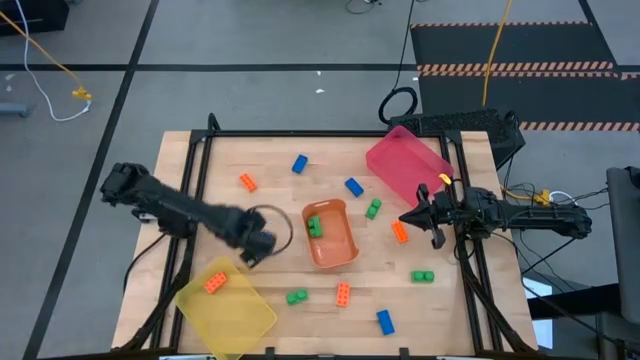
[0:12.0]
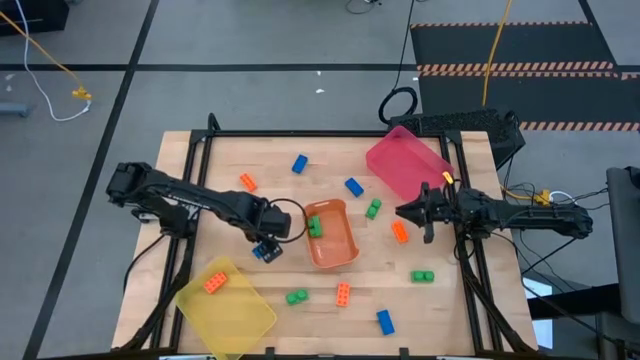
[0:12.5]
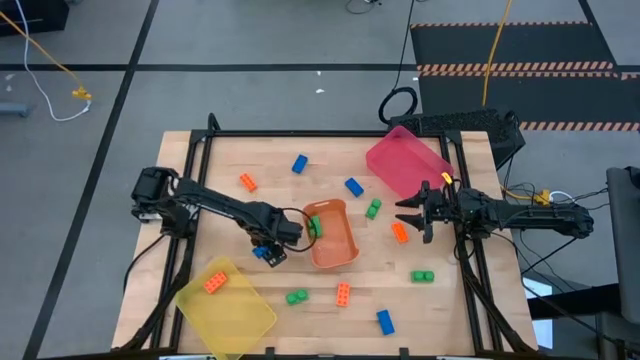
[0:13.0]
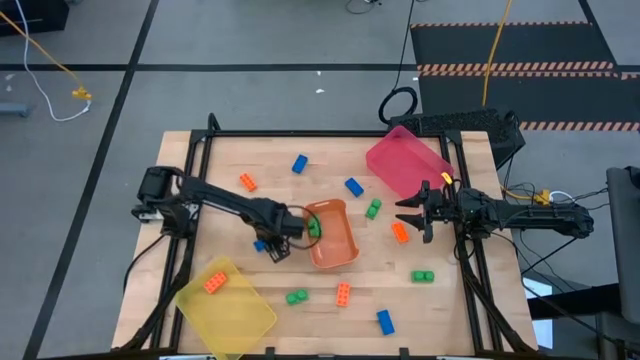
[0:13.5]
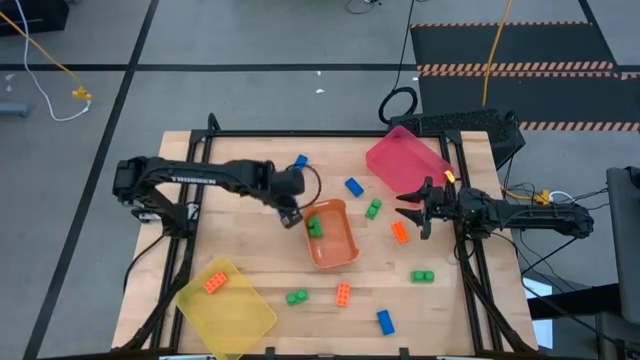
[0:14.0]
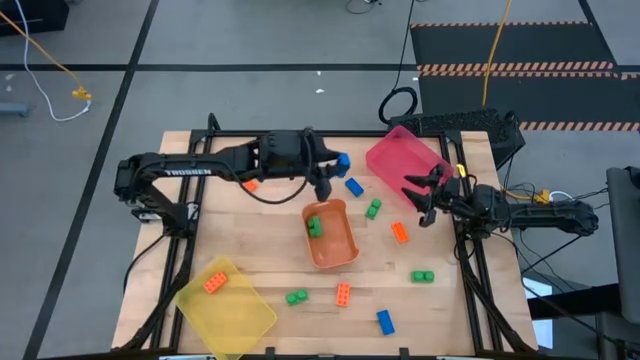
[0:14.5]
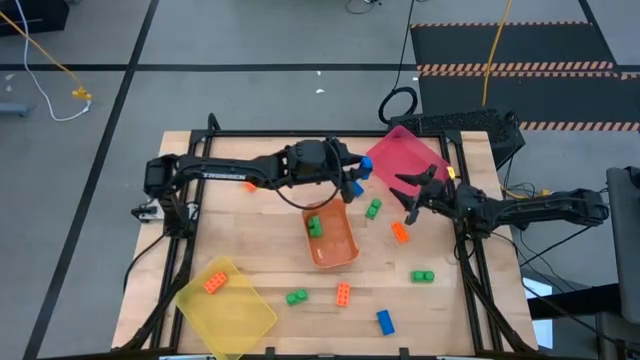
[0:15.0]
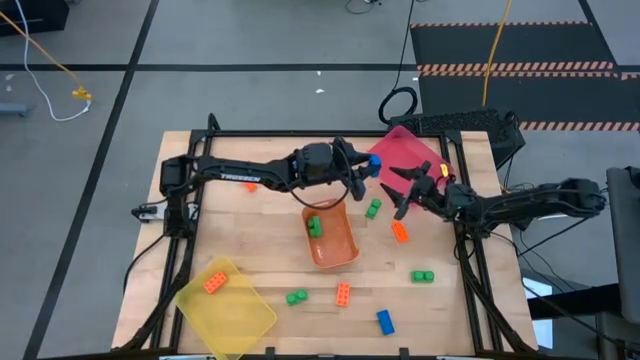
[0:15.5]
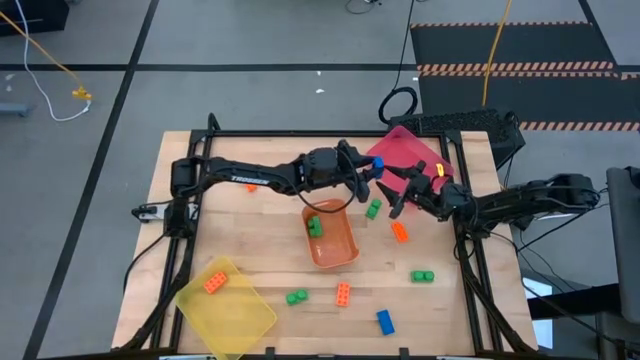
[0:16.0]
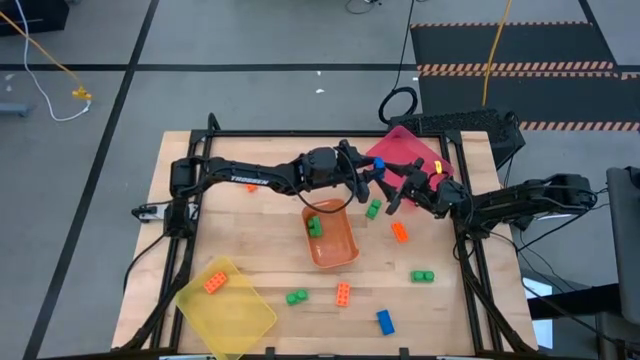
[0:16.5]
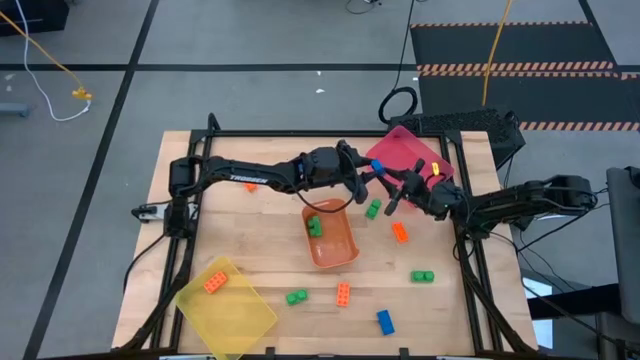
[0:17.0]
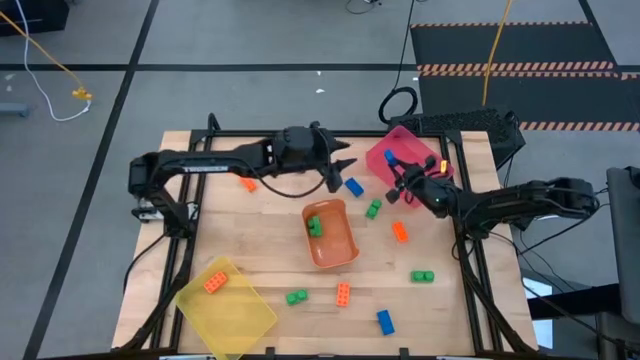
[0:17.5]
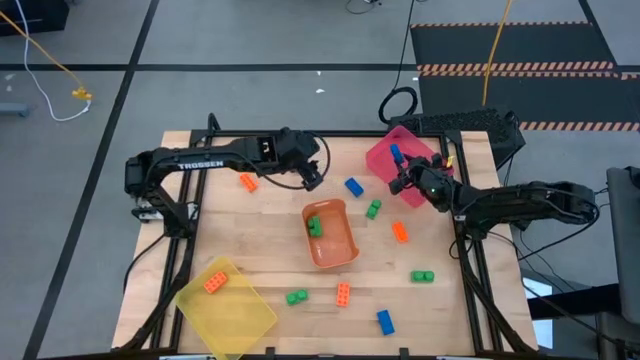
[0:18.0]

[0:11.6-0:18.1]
Task: Sort & place blocks by color
Put the blue game piece into the pink bin

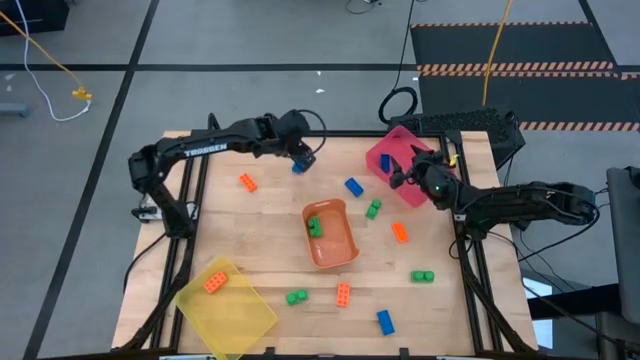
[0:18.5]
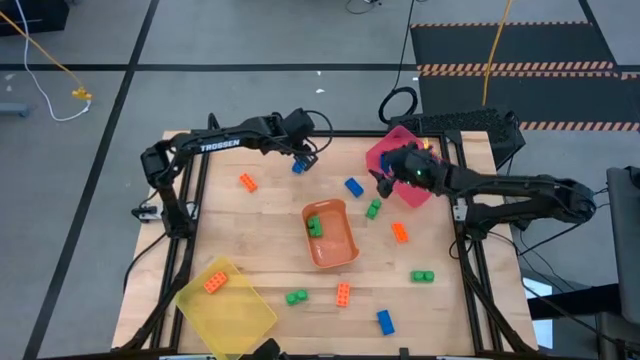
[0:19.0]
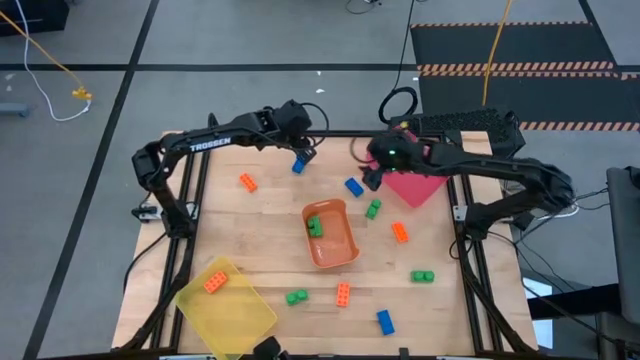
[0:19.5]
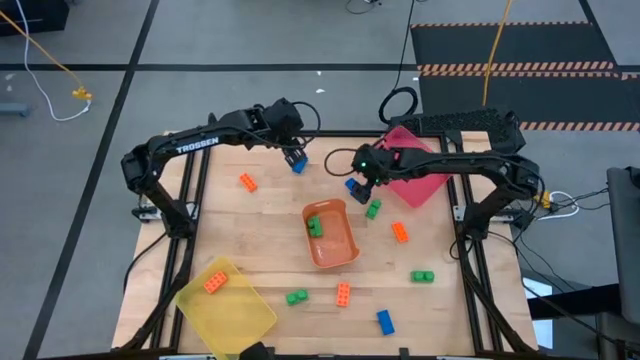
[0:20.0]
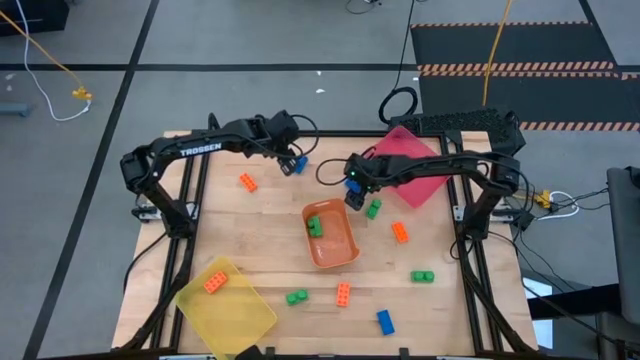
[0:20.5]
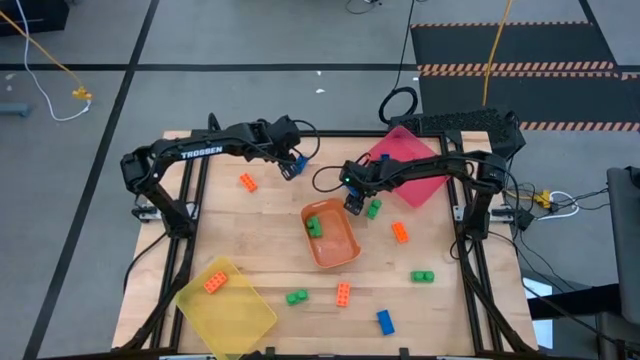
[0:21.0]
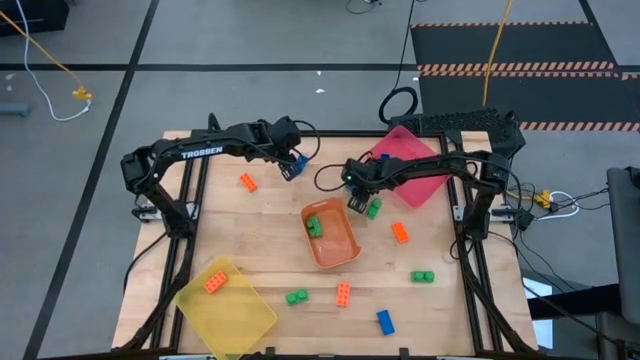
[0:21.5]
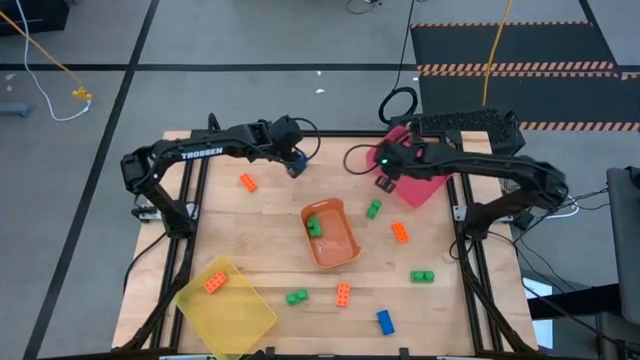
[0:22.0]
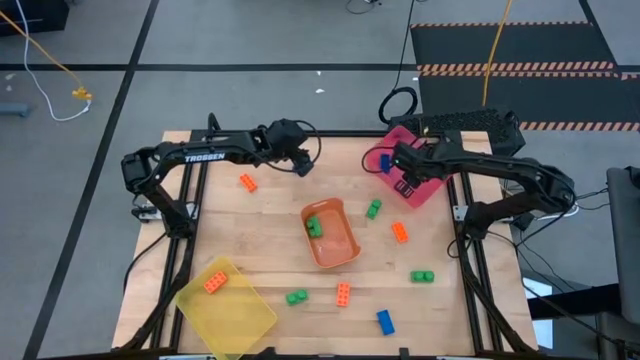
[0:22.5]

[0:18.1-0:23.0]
Put the blue game piece into the pink bin

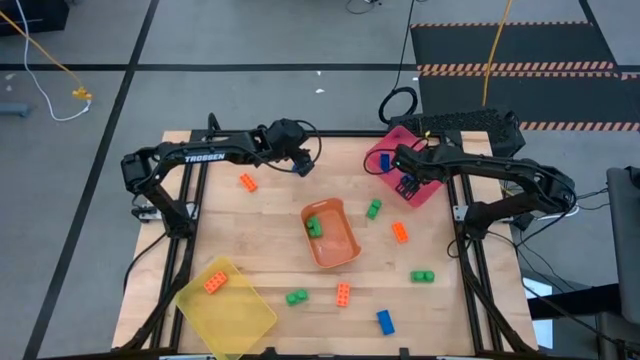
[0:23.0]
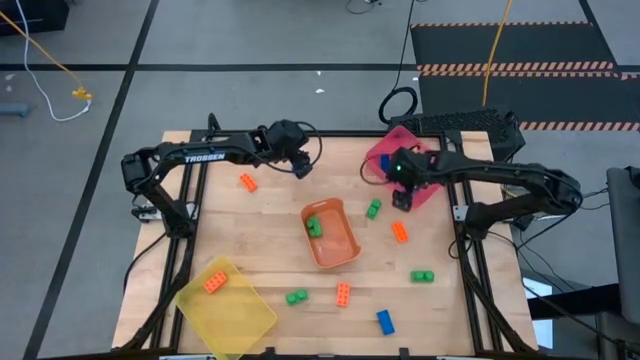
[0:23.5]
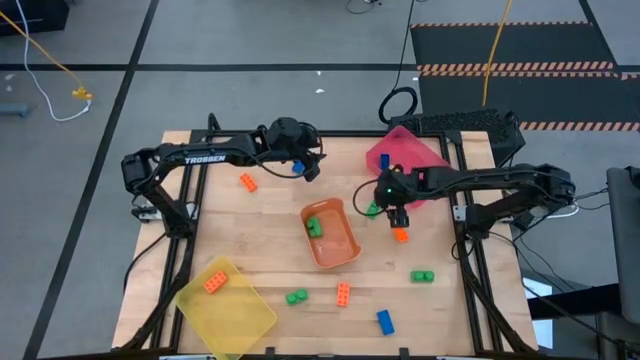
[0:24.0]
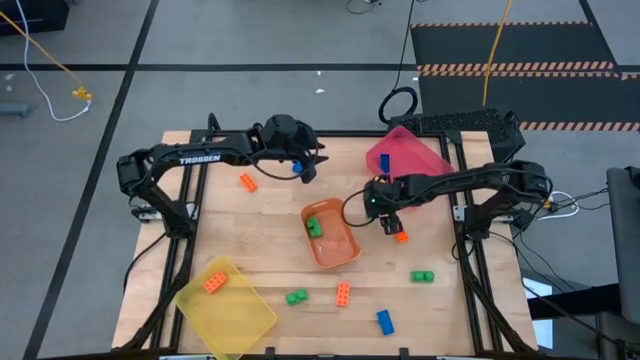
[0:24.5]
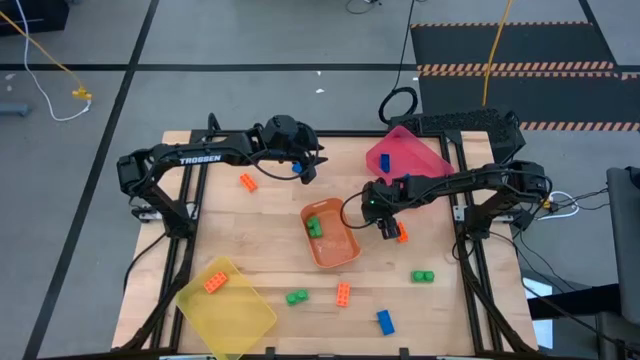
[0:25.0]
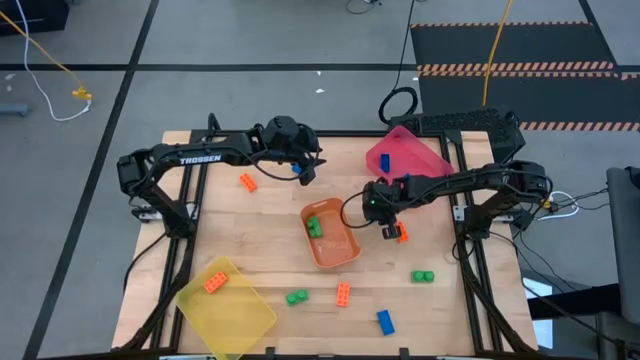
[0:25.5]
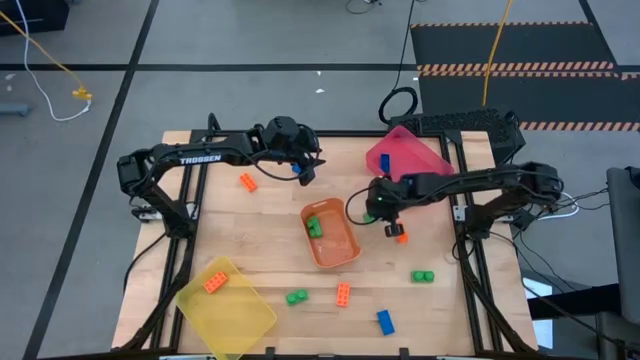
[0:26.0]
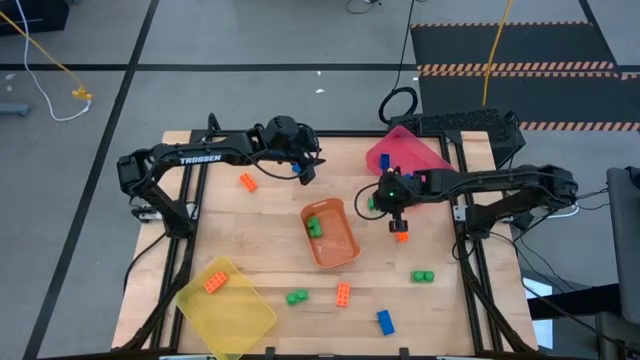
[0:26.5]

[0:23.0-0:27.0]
Put the green game piece into the orange bin

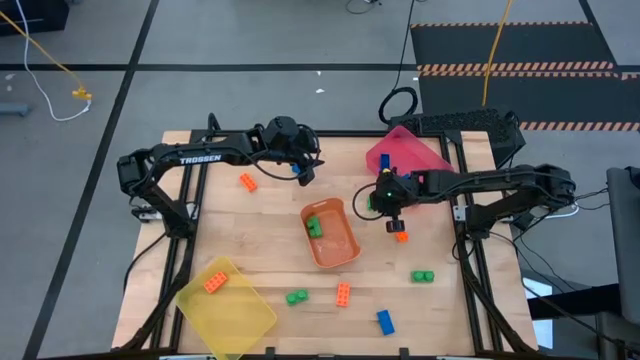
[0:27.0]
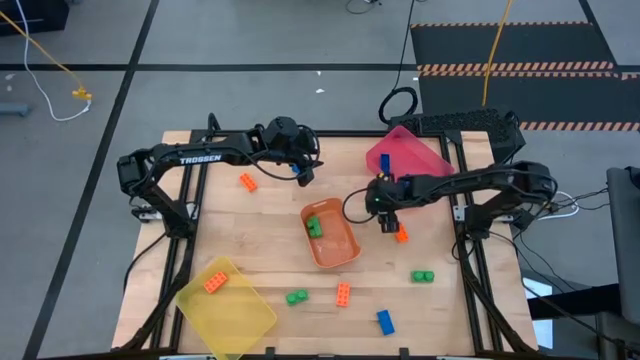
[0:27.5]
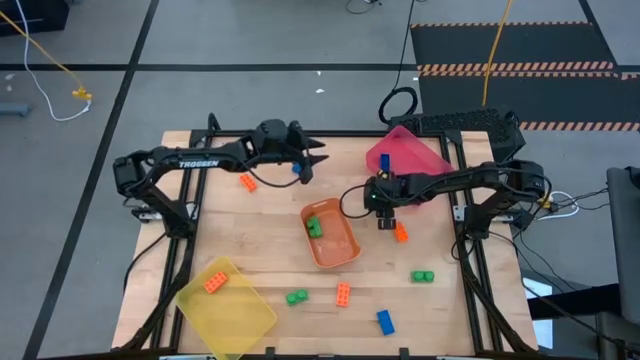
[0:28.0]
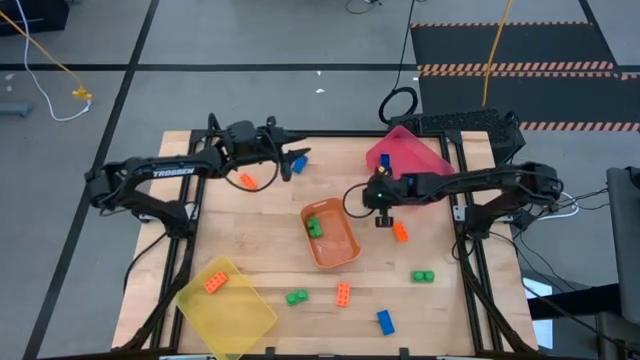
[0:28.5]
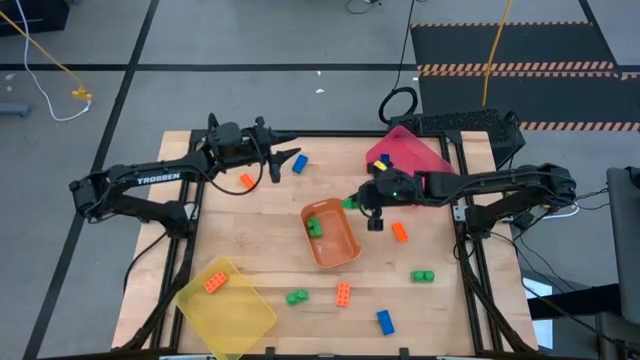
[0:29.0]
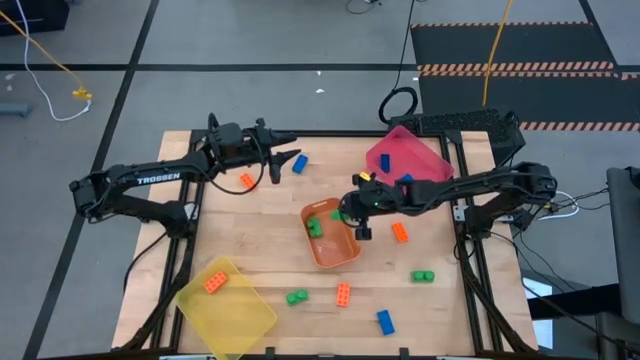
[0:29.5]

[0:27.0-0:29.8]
Put the green game piece into the orange bin

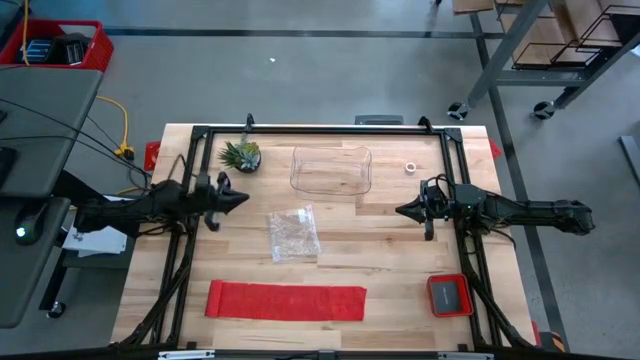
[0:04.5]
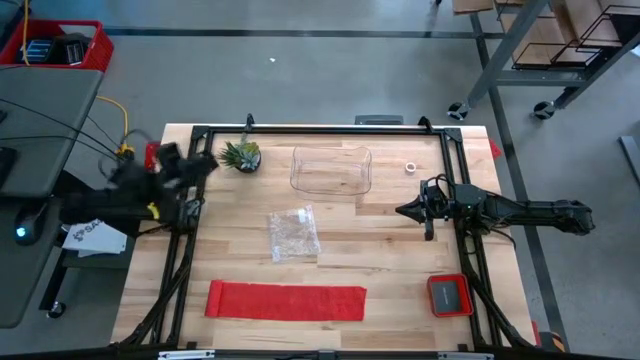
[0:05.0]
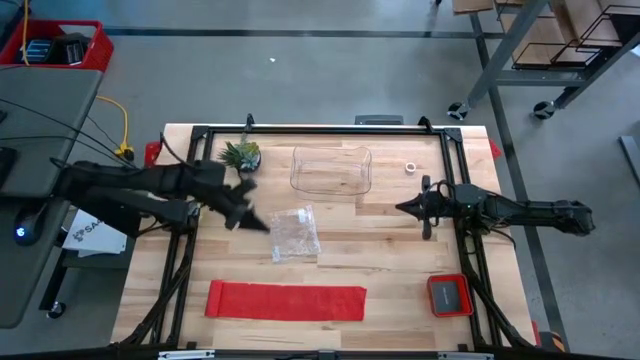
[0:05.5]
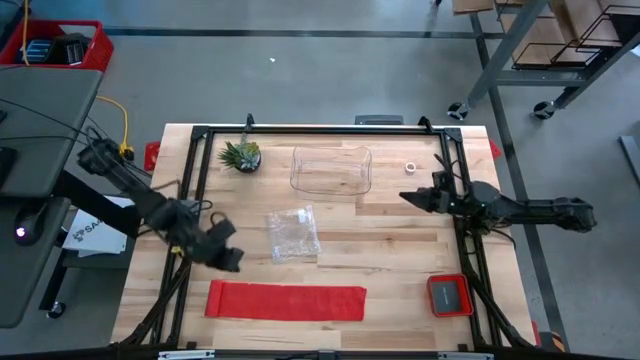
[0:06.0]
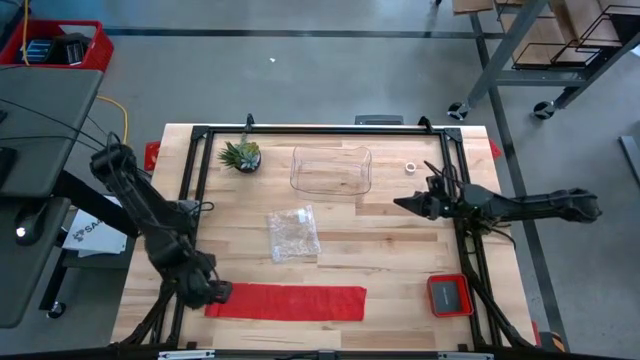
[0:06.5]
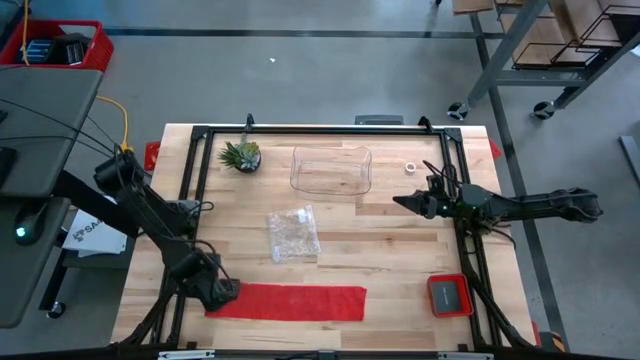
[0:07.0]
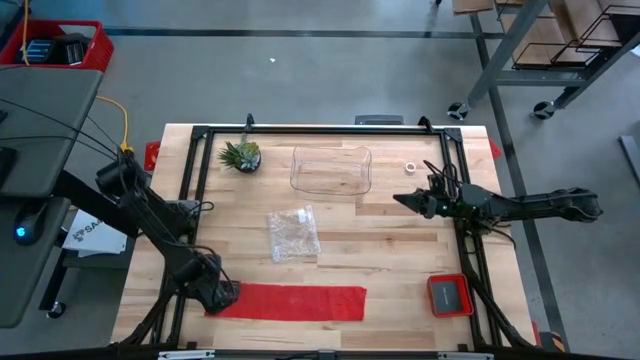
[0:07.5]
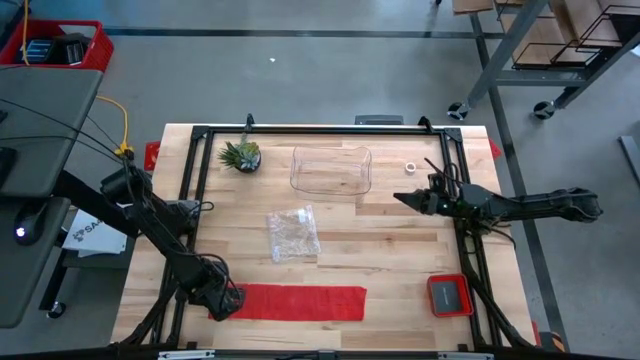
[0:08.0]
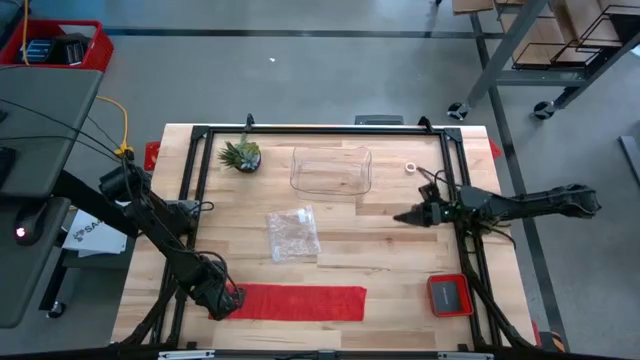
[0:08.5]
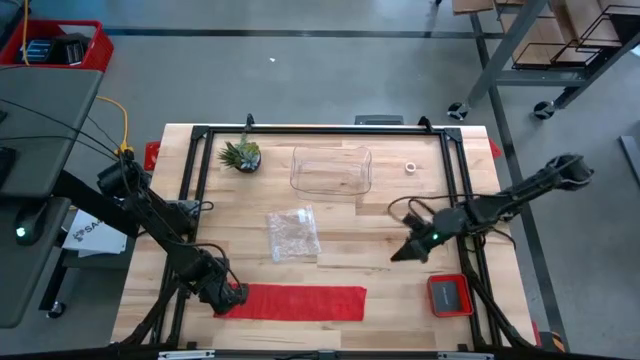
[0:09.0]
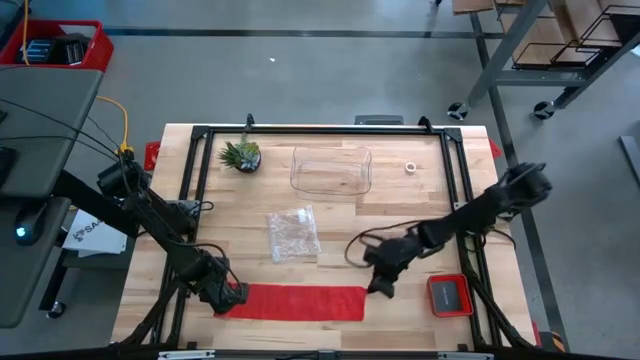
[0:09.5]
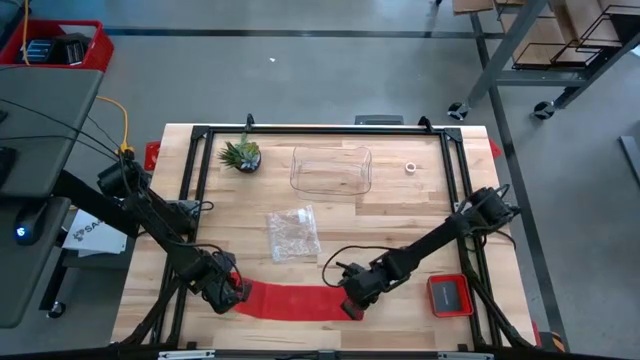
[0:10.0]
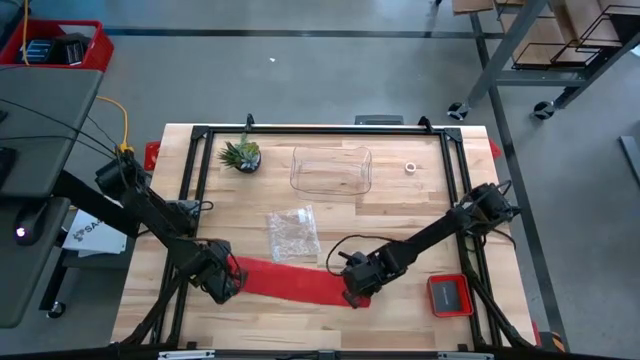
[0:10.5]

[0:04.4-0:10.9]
Task: Roll bandage
Move the red bandage to the center of the table
